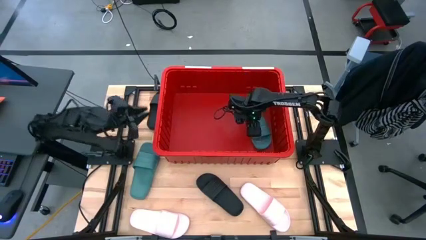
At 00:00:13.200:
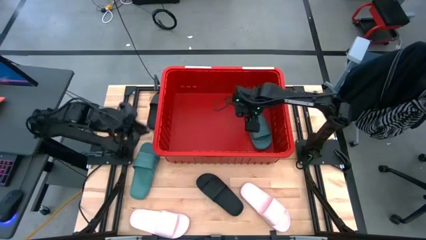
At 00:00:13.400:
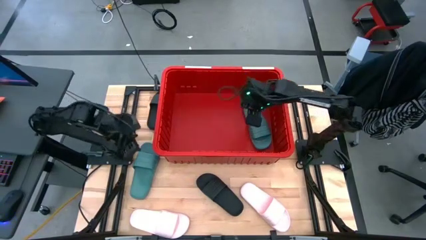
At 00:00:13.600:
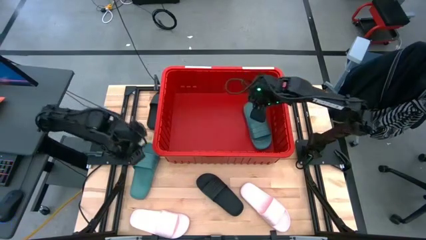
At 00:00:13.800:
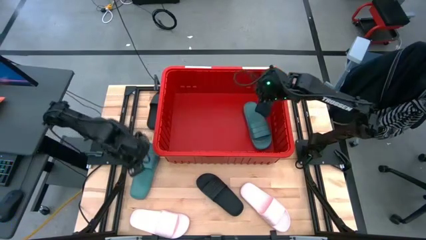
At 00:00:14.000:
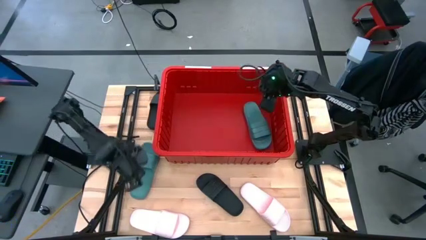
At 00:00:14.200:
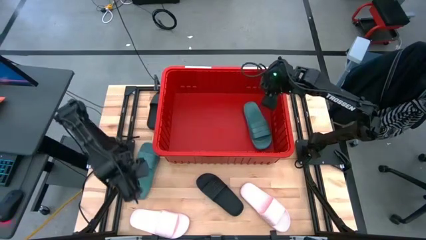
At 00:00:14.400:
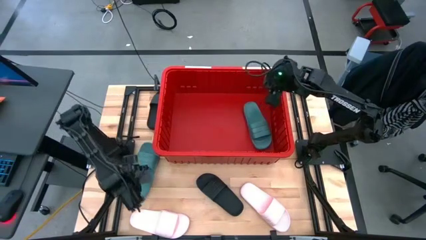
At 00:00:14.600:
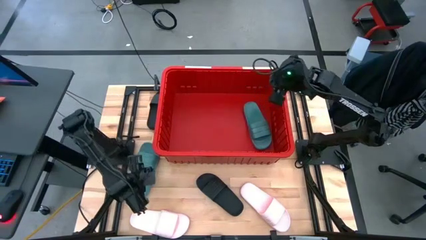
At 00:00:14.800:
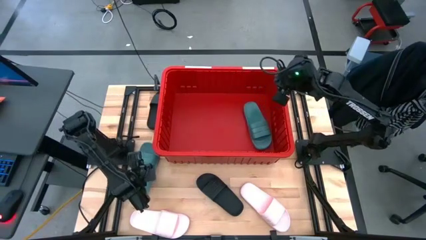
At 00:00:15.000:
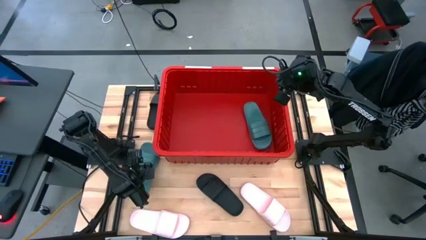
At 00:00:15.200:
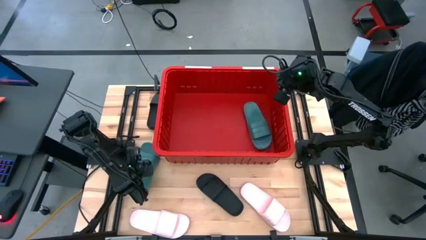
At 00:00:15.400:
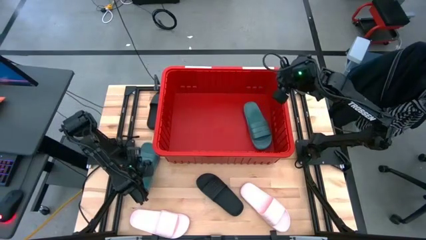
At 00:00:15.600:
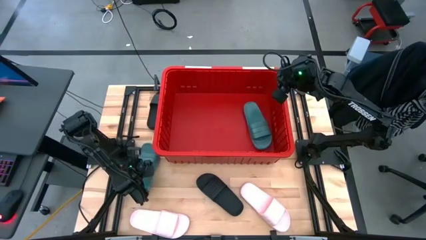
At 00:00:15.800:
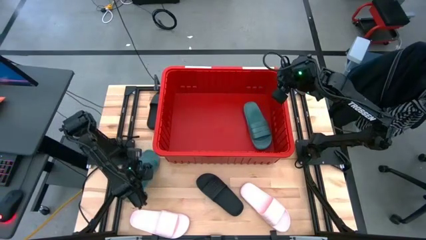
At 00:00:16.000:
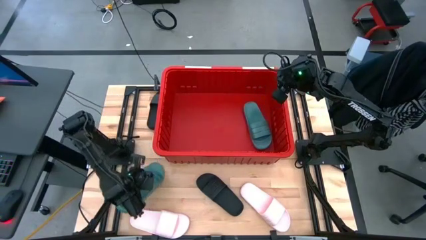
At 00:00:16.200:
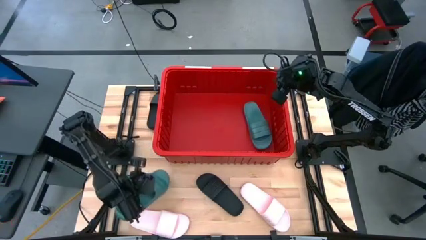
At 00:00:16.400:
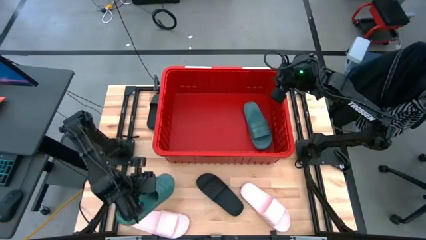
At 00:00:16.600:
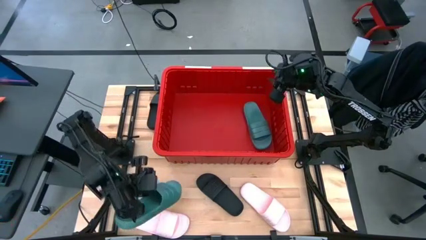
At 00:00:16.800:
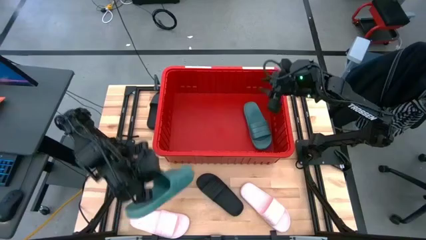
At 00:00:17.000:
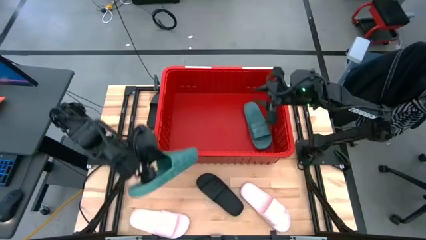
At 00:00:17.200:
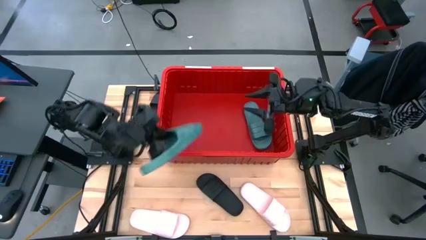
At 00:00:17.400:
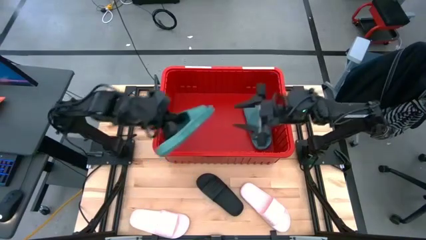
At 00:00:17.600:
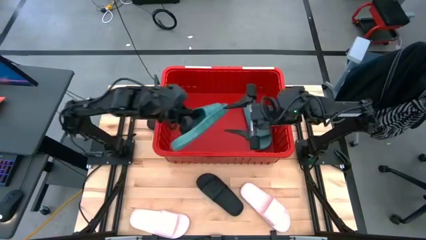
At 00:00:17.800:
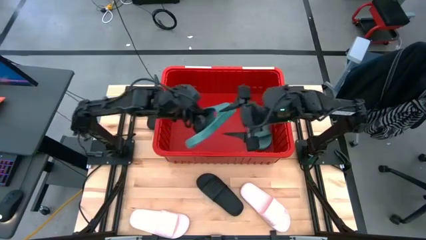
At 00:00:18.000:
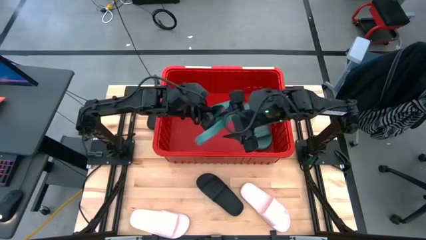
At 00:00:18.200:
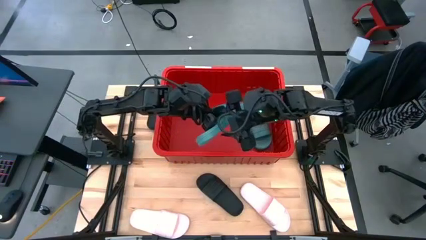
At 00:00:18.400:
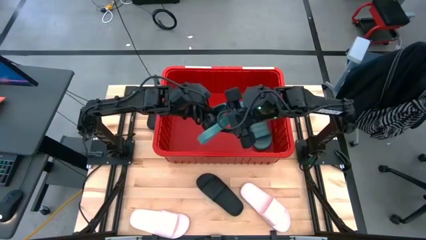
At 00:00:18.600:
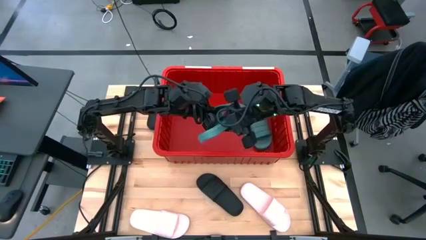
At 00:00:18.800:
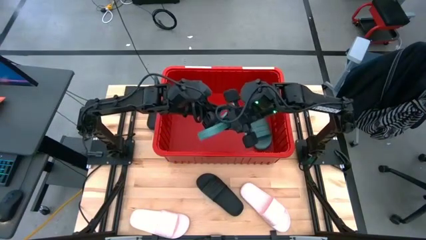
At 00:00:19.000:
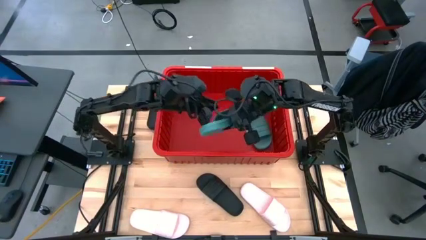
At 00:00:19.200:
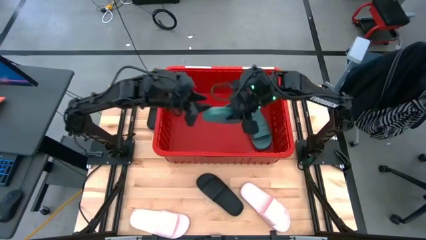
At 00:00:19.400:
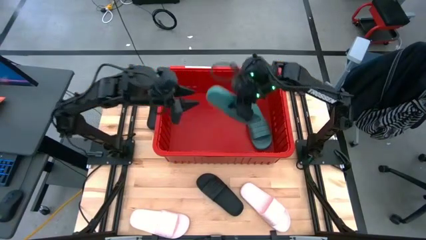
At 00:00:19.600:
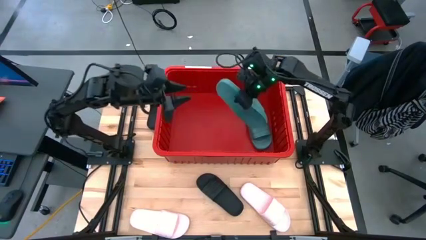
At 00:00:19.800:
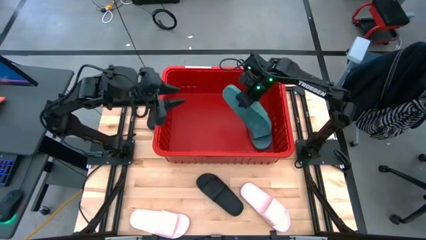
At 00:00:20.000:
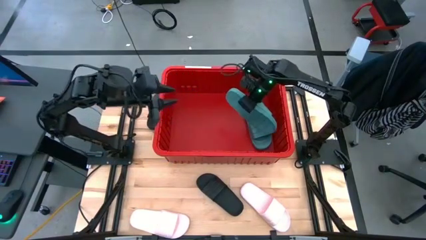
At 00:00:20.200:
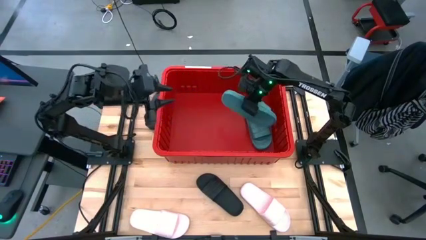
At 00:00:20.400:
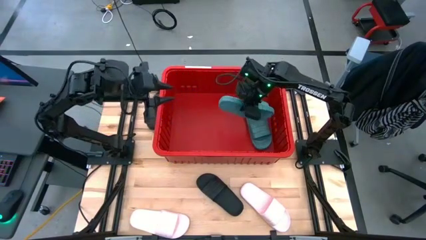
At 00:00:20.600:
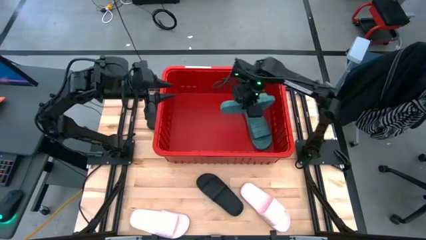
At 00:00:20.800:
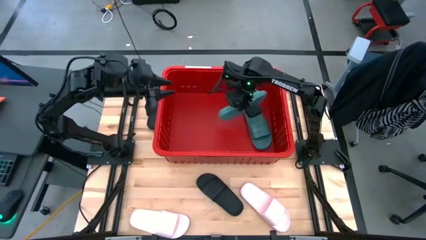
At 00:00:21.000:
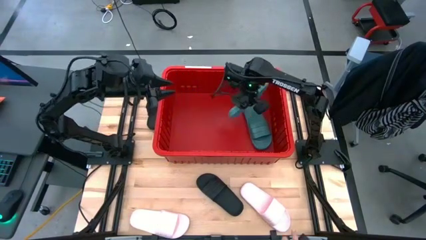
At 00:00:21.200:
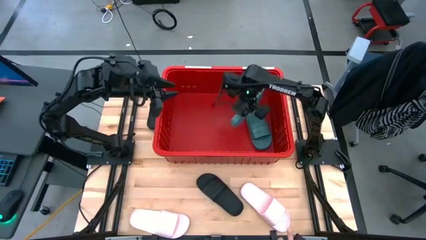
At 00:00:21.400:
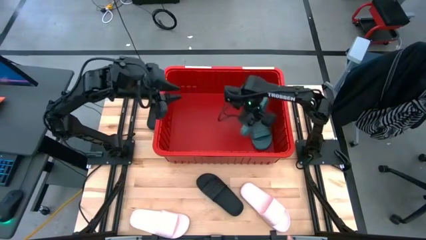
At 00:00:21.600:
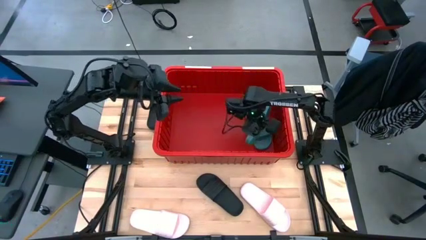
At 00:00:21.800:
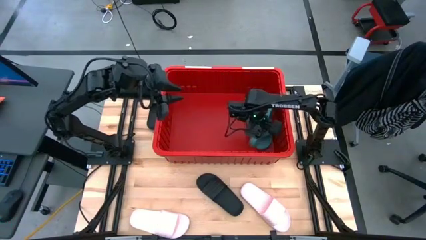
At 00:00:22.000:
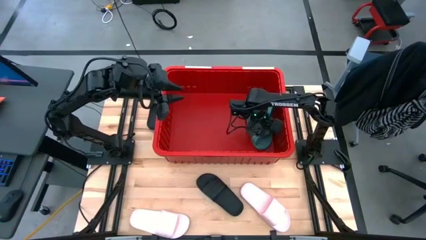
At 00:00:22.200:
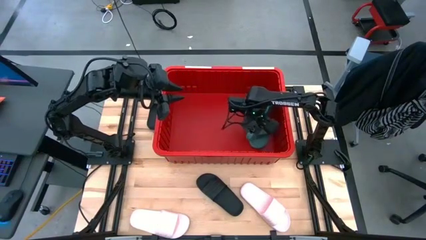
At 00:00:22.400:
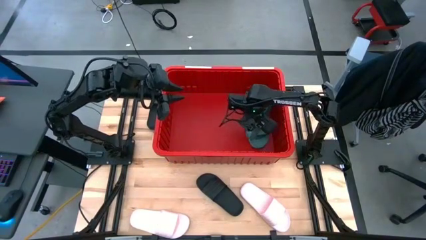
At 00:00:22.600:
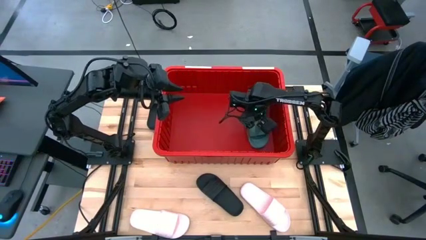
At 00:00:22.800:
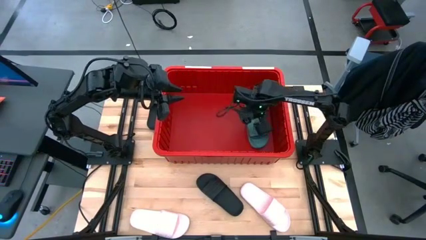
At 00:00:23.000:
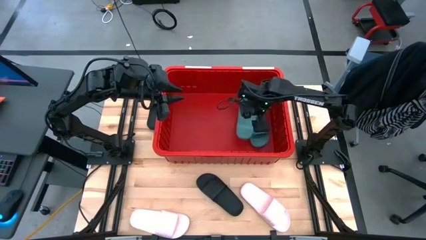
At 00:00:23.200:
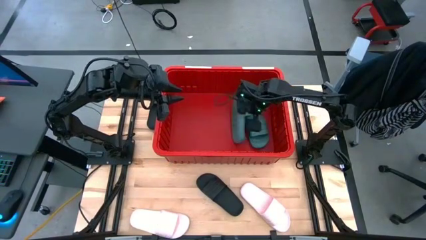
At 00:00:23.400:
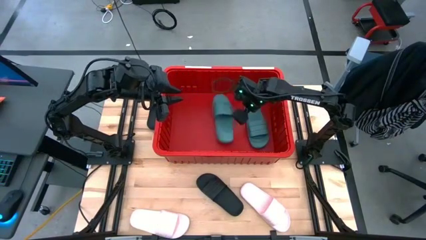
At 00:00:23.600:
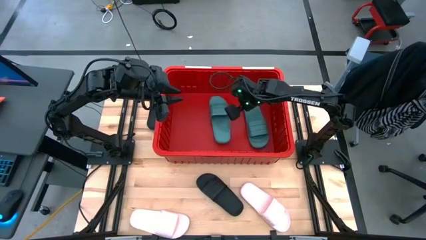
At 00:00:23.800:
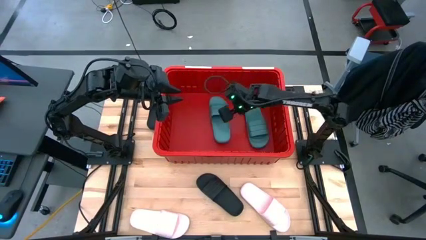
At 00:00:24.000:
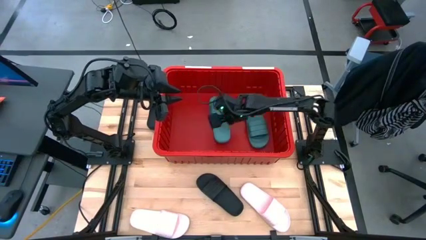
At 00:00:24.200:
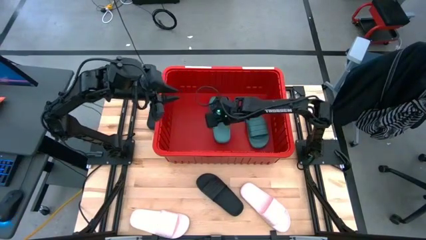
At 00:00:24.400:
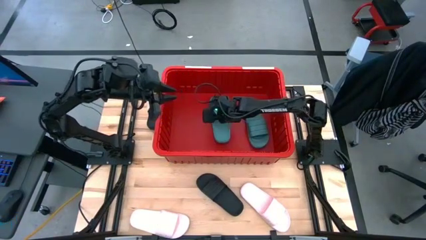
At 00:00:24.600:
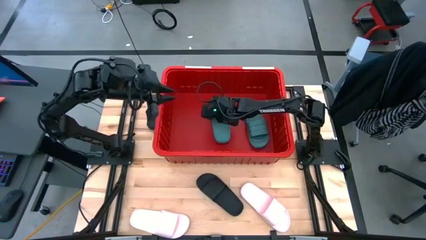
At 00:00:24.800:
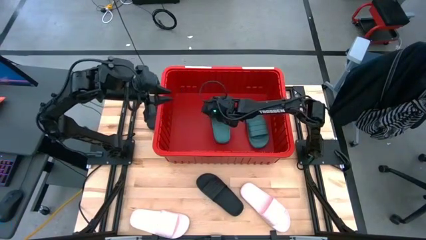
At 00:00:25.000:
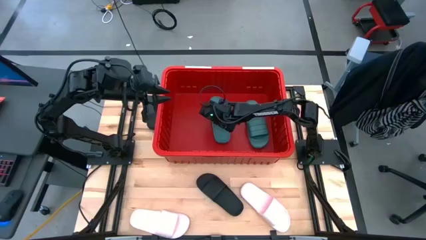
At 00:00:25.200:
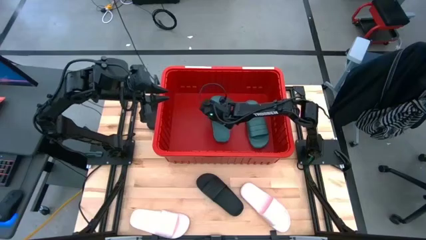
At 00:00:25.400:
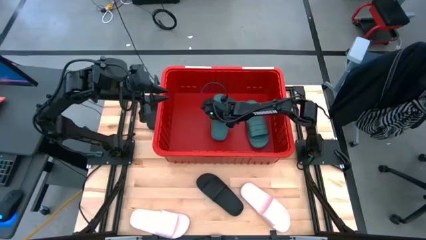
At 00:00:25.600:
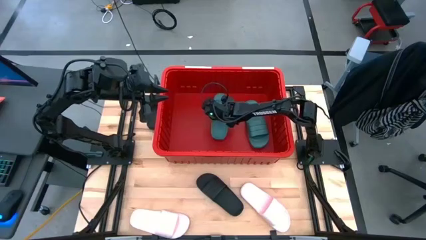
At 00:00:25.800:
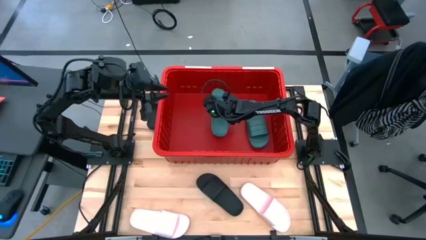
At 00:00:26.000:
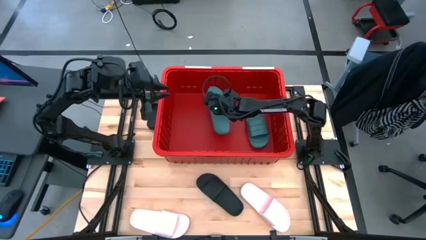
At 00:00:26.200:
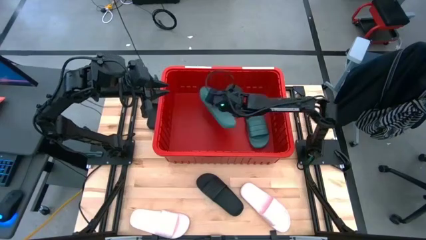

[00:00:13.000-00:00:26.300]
Task: Pick and place slides into bin
Put the green slides into the red bin
